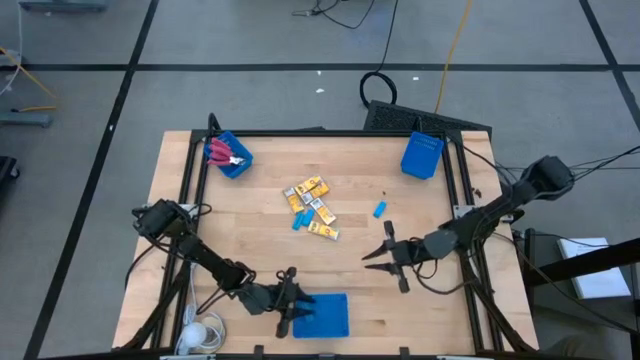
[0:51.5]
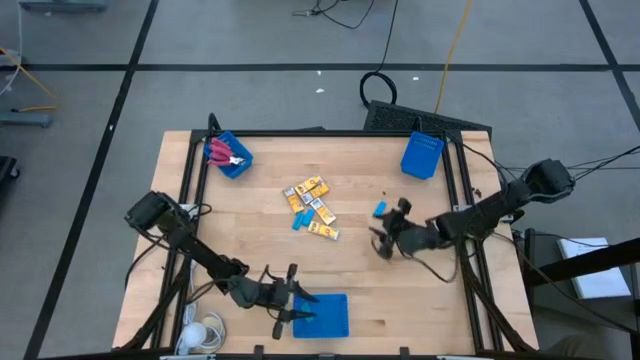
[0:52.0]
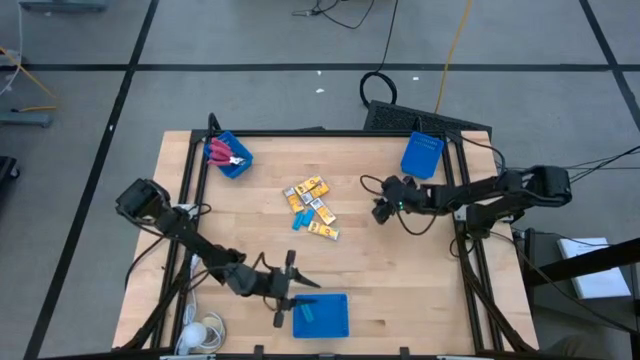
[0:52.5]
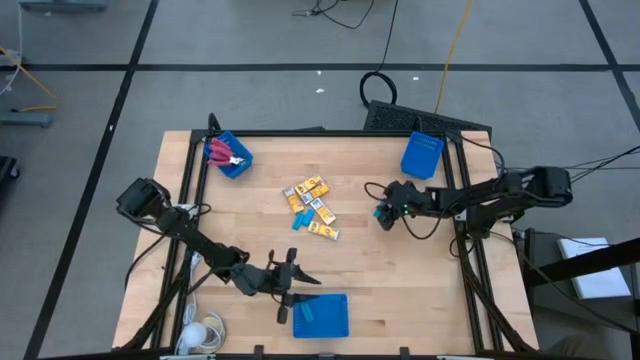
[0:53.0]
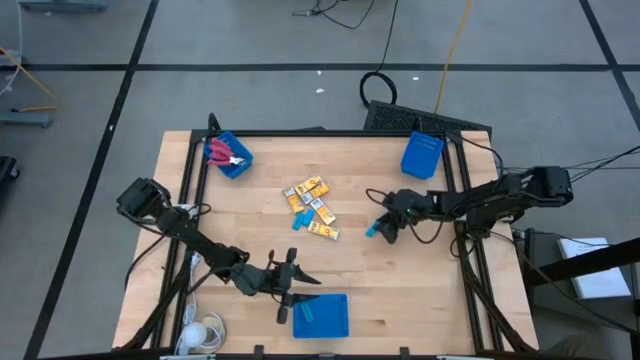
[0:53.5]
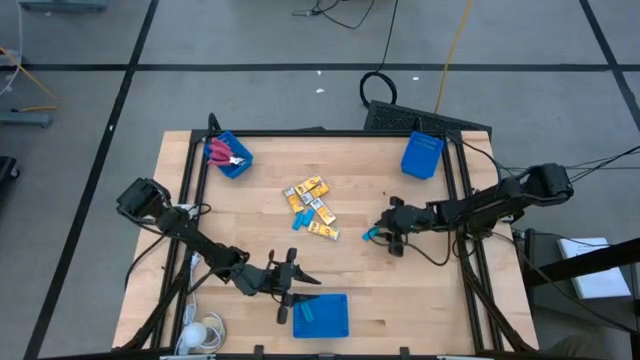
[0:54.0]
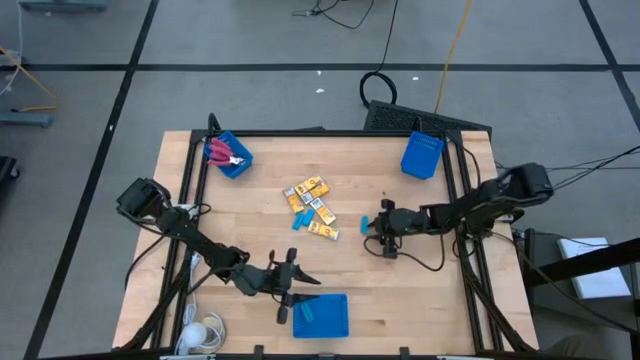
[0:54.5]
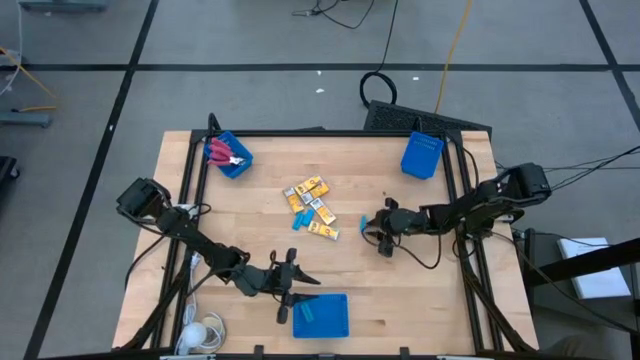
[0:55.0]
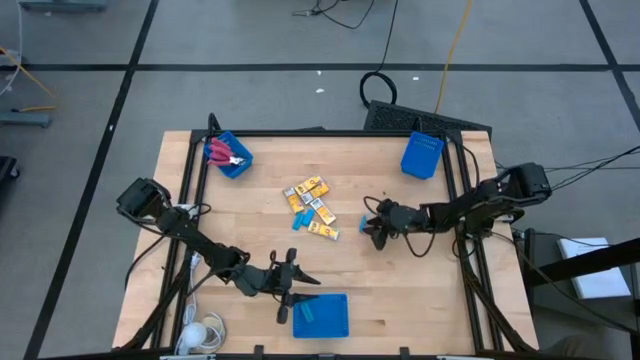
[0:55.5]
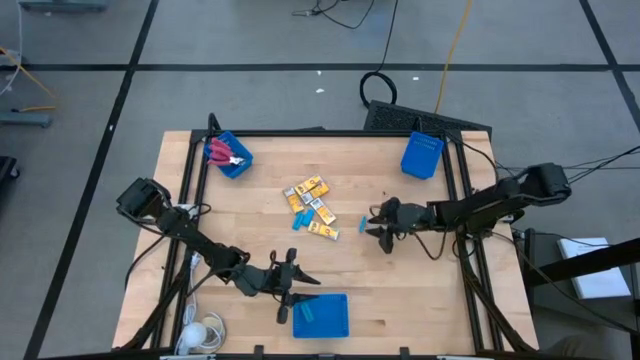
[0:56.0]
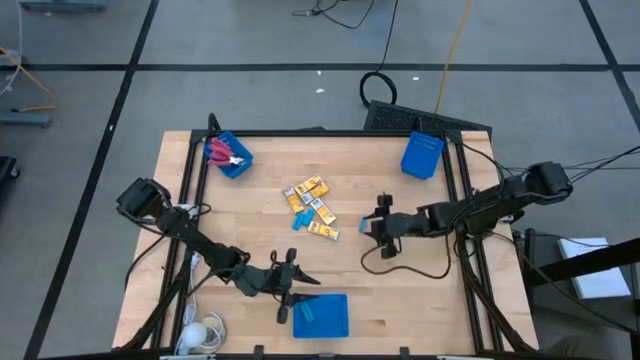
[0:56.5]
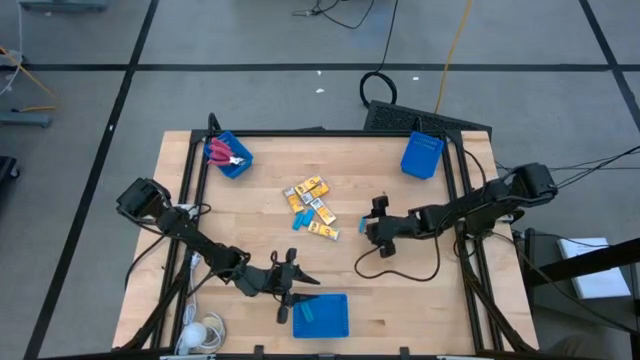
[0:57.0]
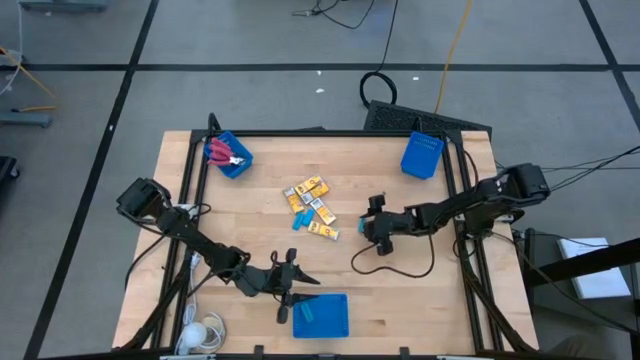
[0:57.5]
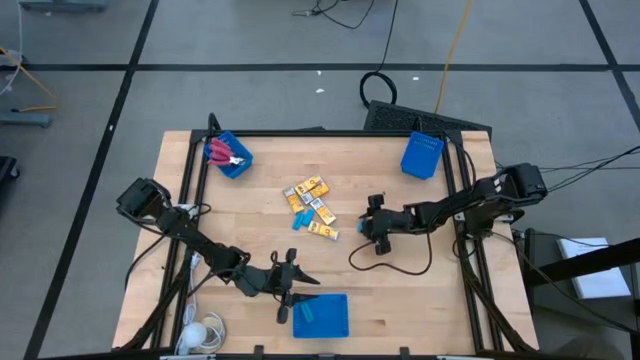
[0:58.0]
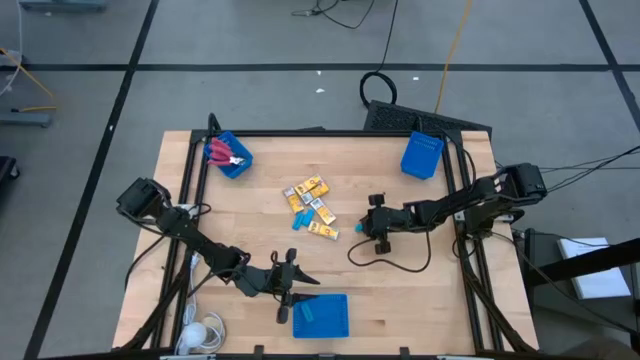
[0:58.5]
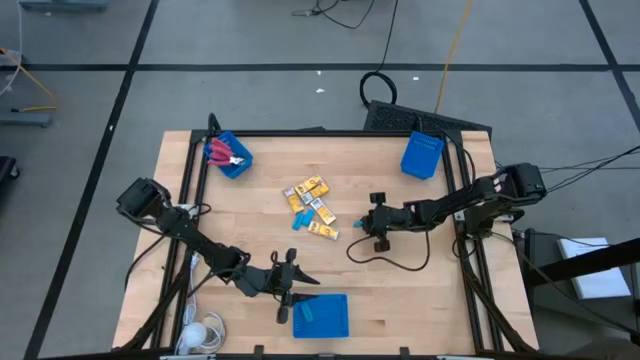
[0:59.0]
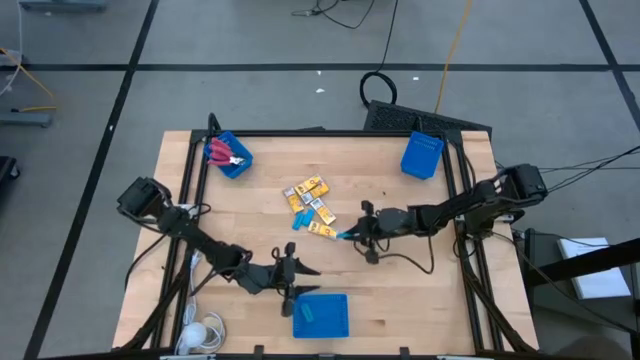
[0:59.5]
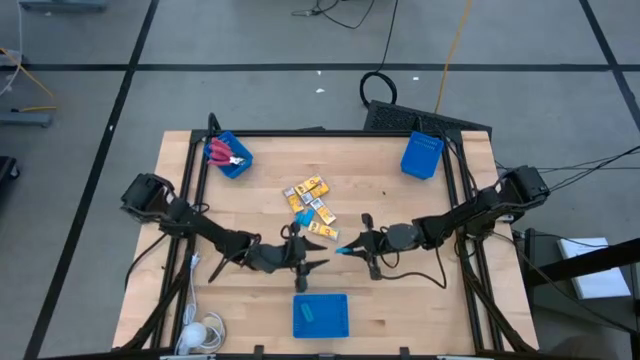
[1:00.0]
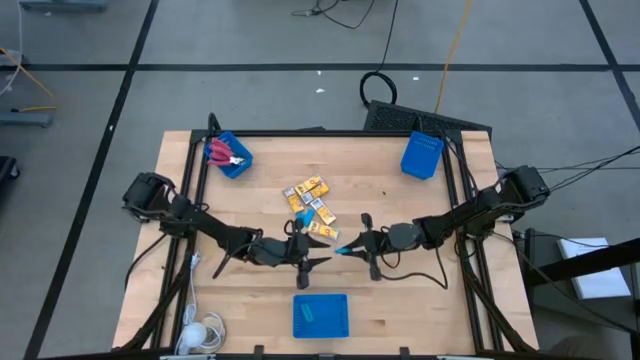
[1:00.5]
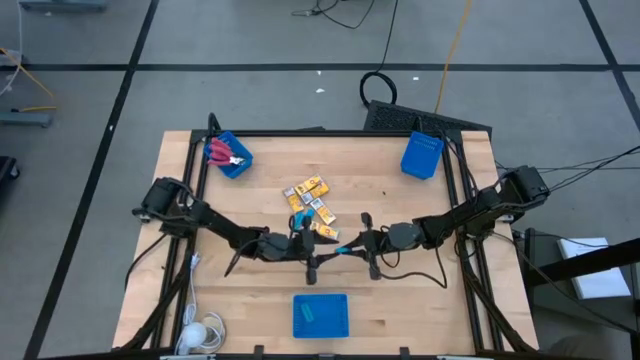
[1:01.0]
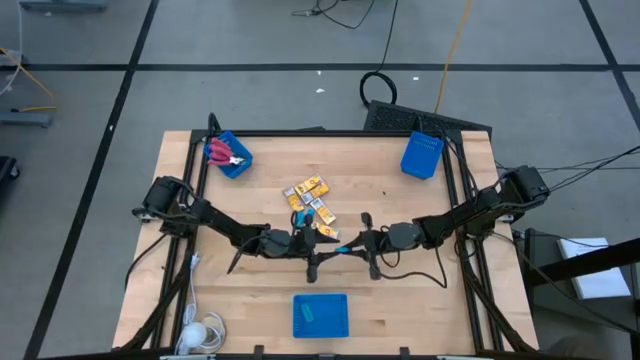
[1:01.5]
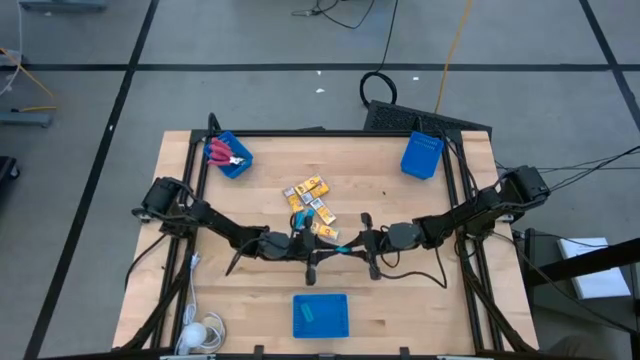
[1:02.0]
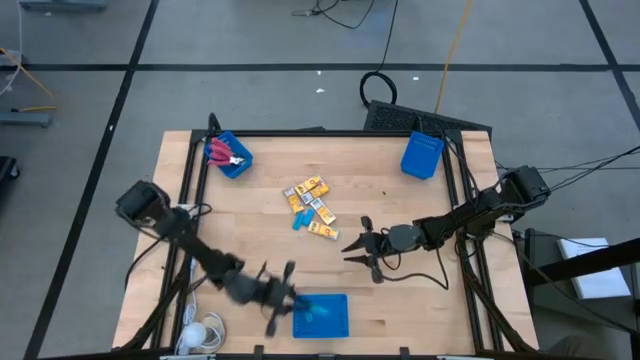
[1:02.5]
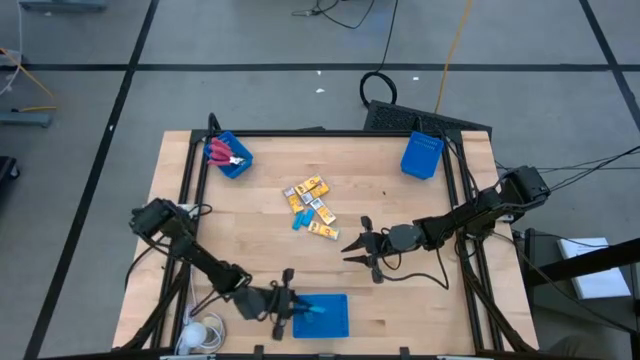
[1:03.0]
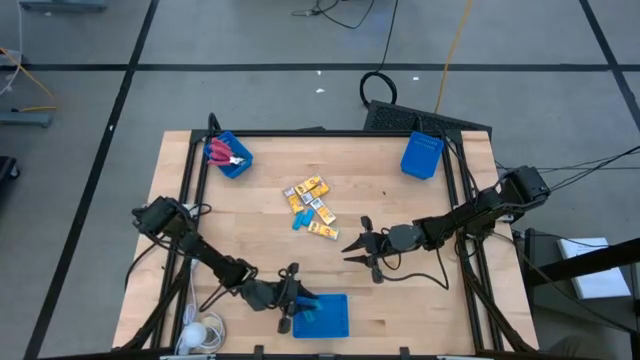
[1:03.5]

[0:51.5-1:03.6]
Task: Pick & Place School Supplies
Put the blue eraser into the bottom blue bin

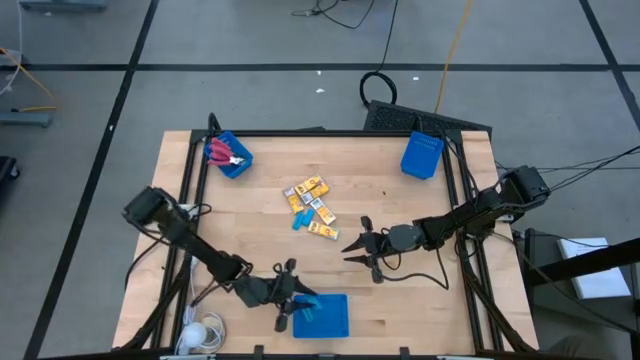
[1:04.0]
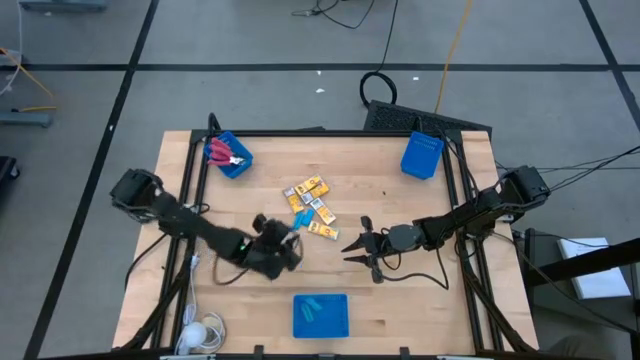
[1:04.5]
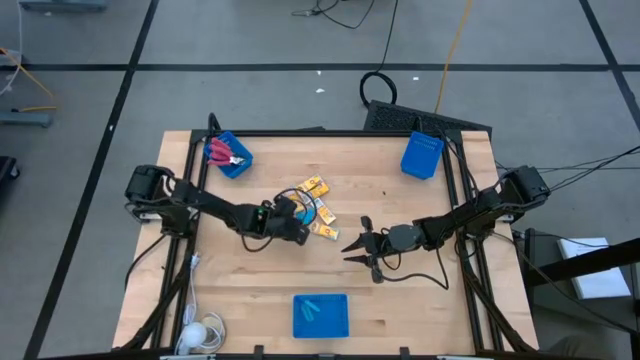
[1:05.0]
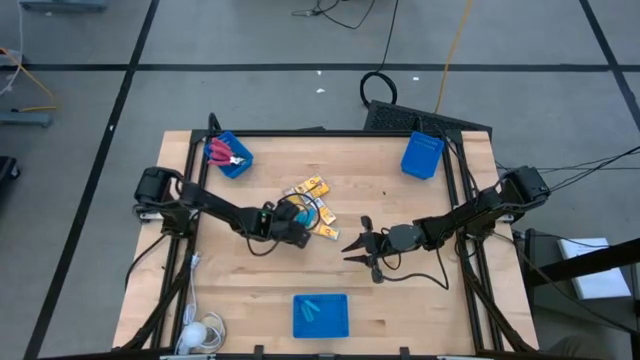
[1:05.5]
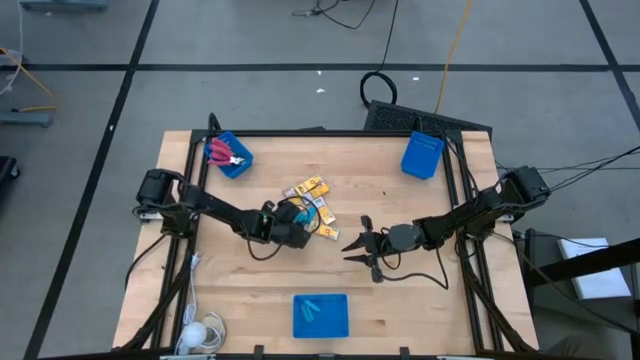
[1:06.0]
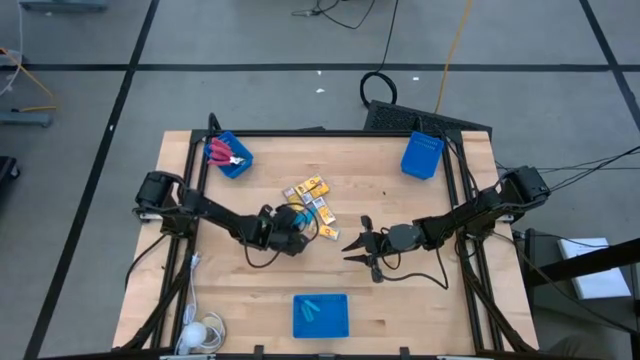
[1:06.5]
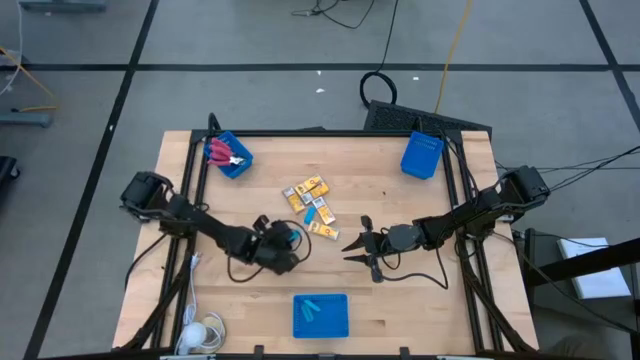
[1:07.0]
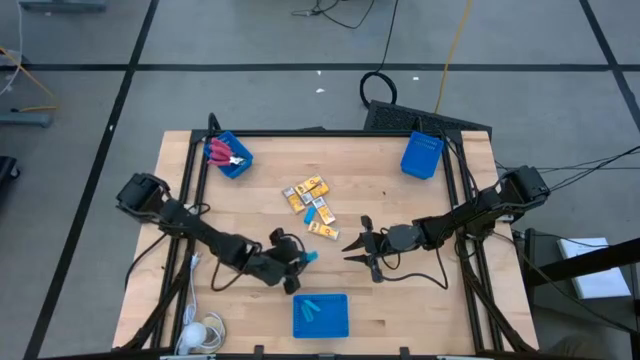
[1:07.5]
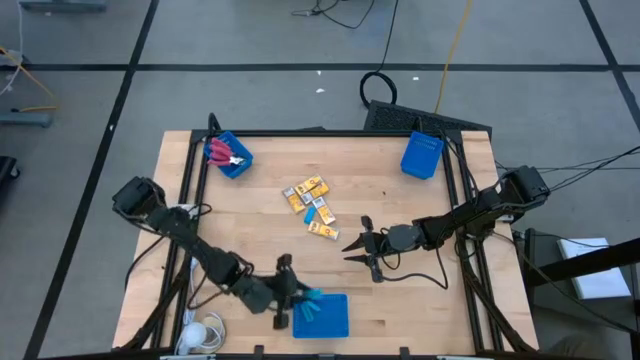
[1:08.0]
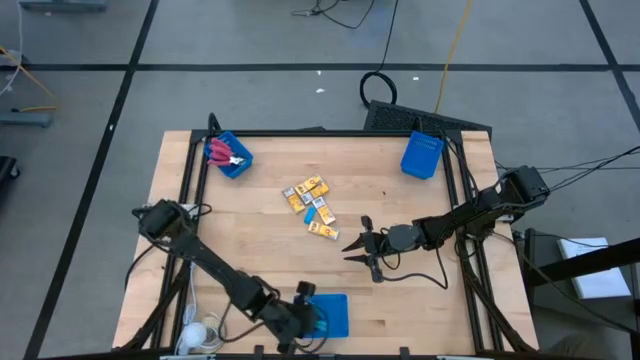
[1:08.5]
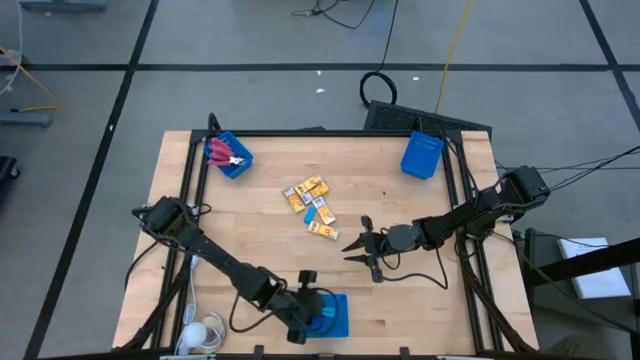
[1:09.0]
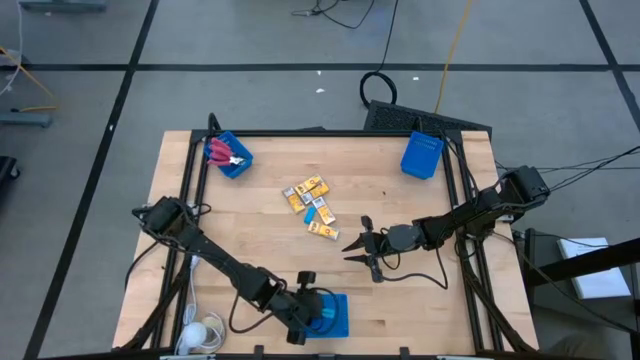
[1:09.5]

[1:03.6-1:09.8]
Put the blue eraser into the bottom blue bin

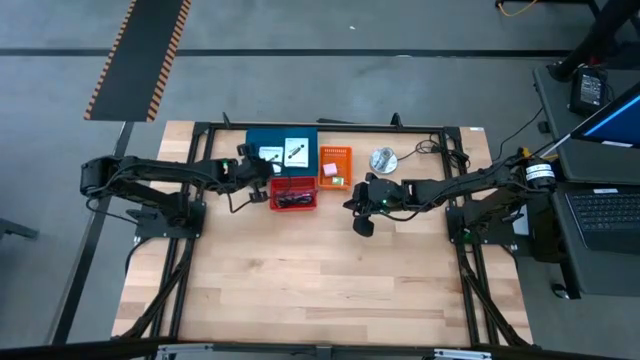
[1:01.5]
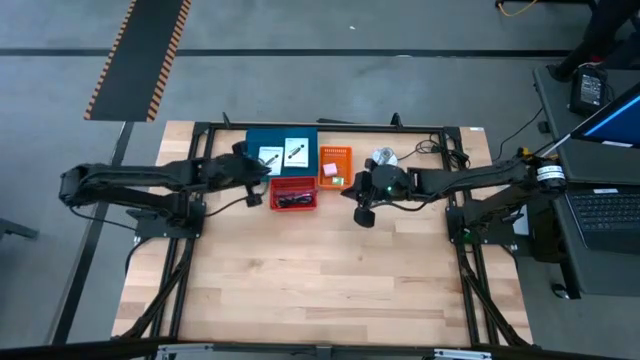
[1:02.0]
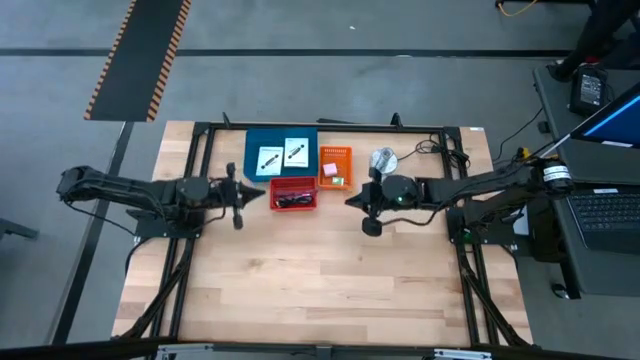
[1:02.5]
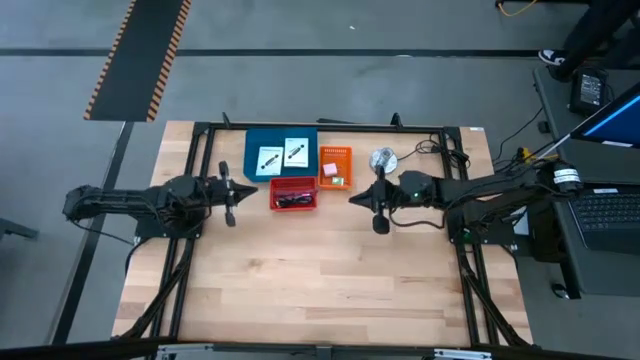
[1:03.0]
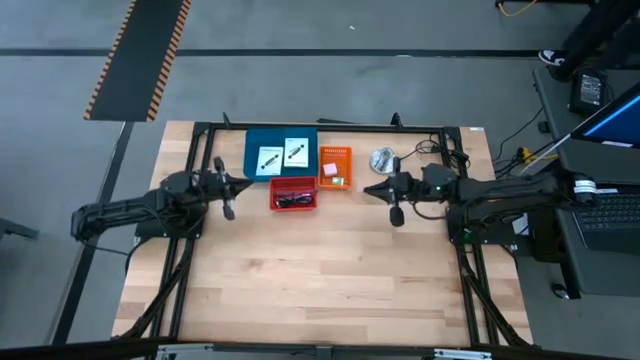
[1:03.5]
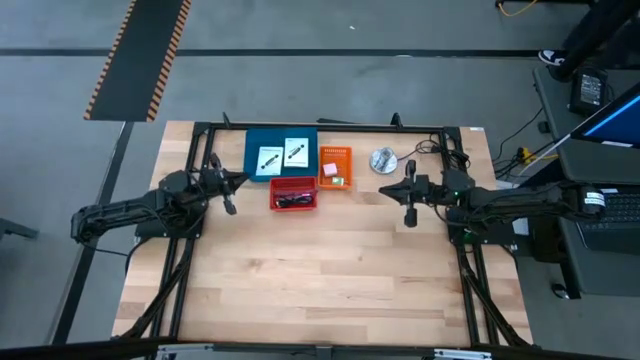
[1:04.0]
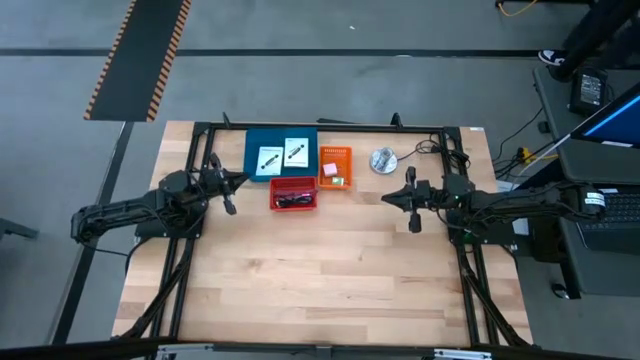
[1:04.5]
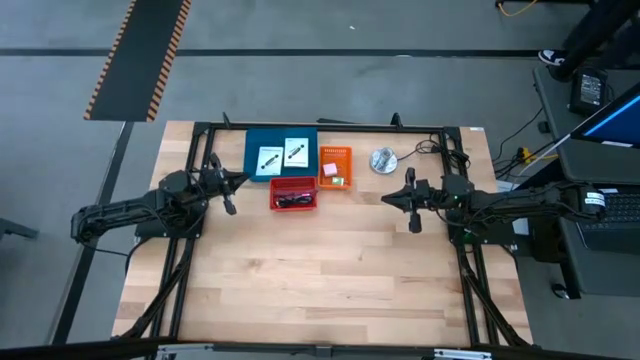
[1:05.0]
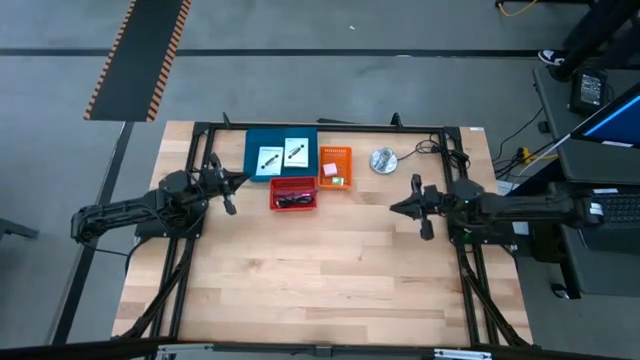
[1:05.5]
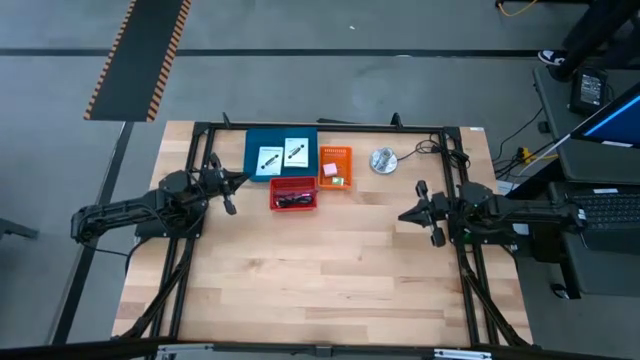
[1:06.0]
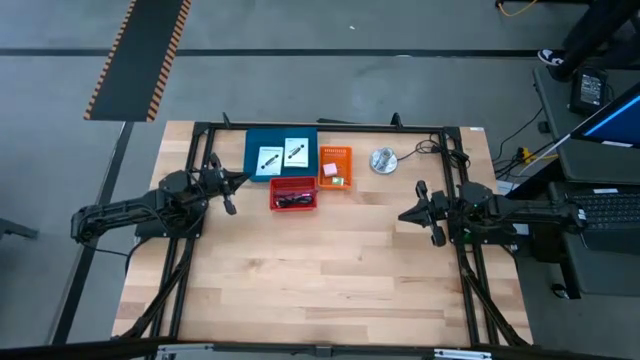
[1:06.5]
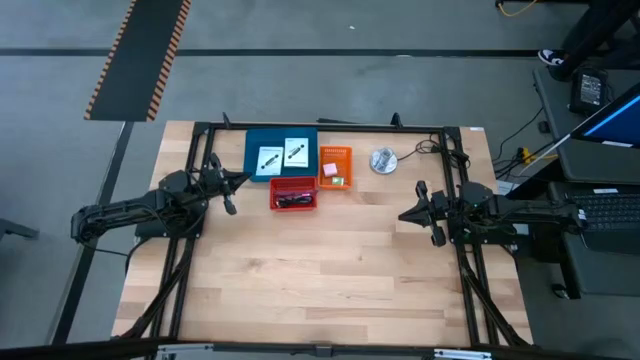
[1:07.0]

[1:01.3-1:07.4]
Task: Pick and place items into bin
Return to Home Position
